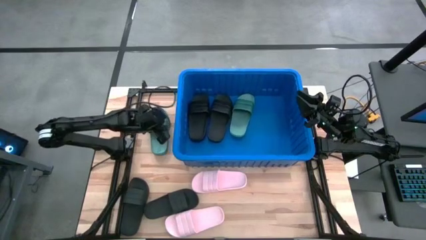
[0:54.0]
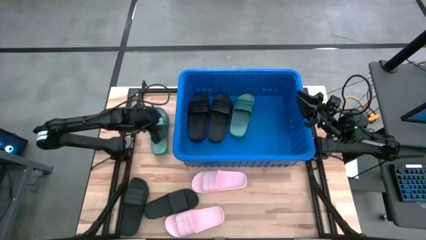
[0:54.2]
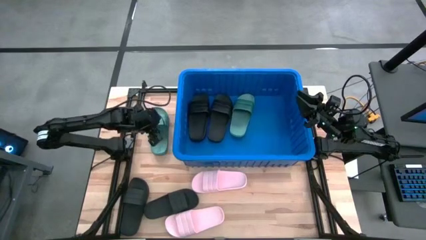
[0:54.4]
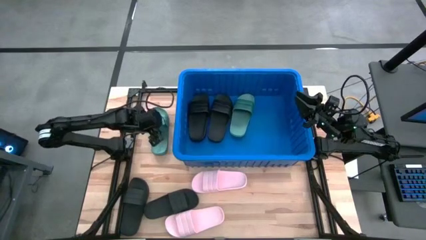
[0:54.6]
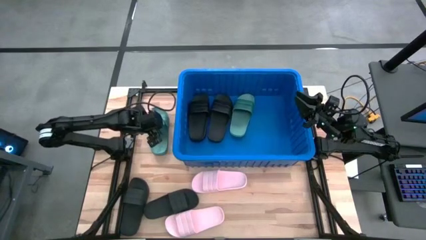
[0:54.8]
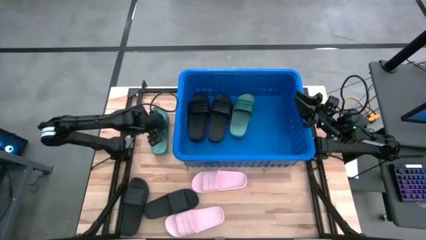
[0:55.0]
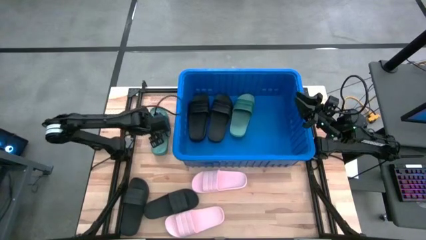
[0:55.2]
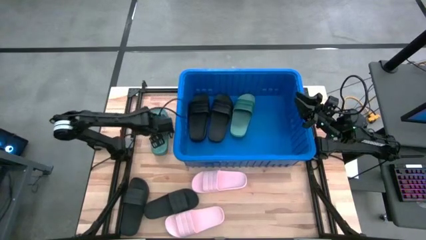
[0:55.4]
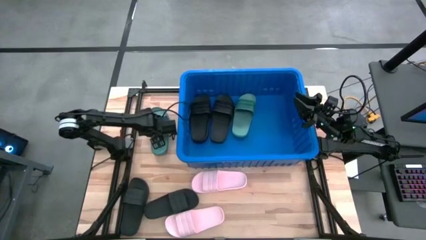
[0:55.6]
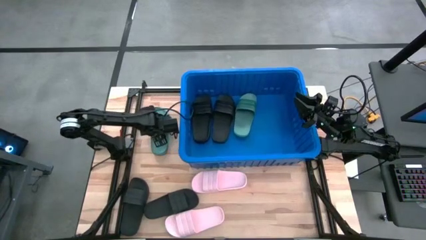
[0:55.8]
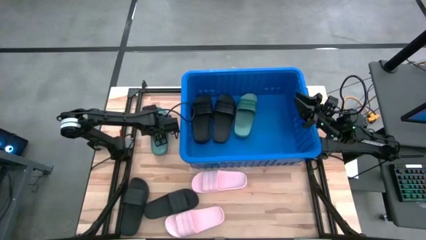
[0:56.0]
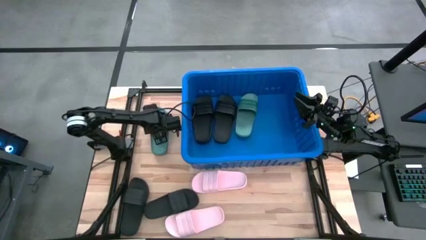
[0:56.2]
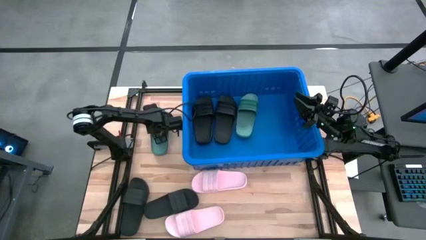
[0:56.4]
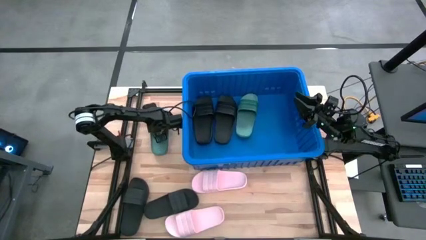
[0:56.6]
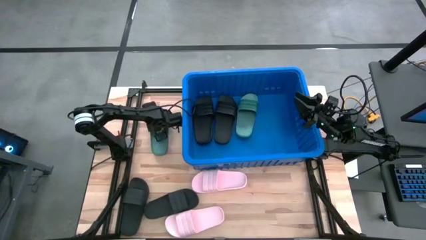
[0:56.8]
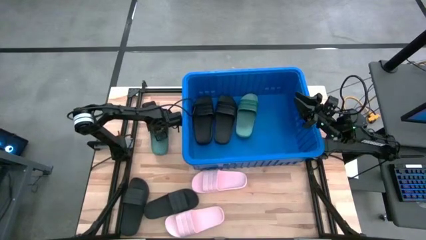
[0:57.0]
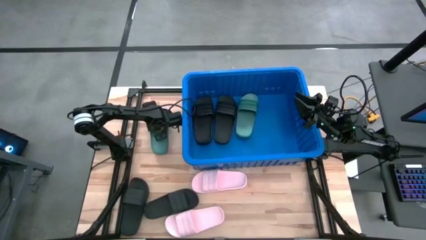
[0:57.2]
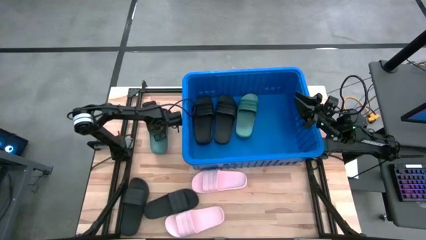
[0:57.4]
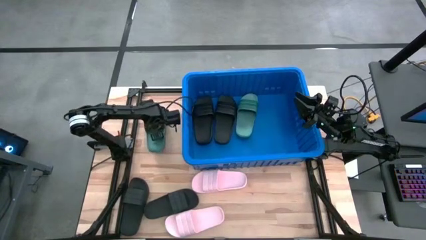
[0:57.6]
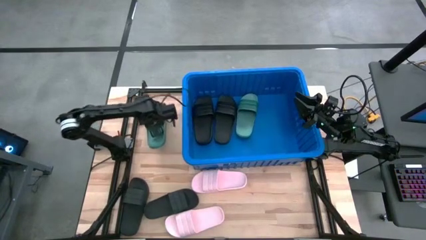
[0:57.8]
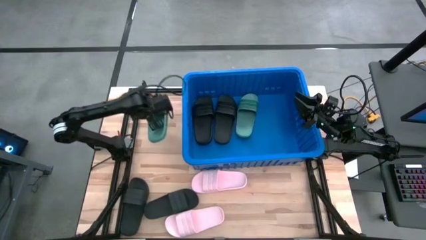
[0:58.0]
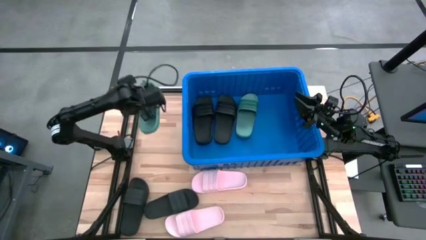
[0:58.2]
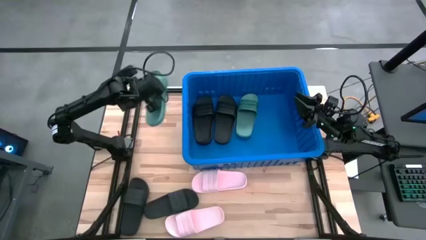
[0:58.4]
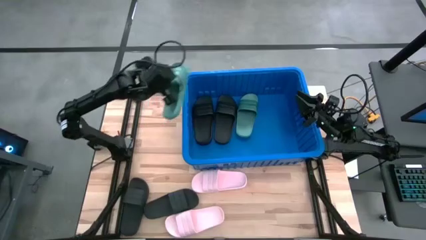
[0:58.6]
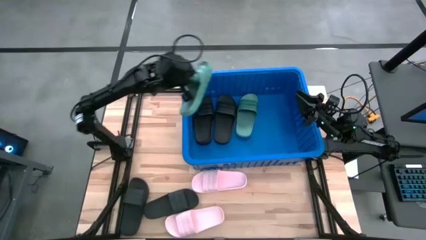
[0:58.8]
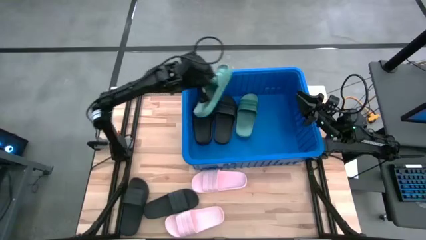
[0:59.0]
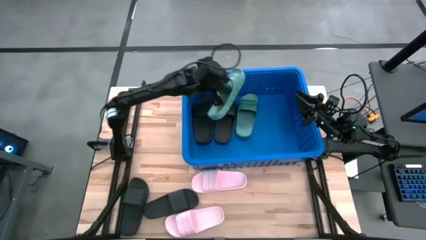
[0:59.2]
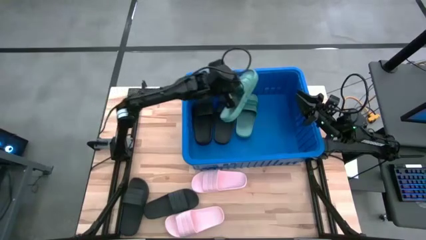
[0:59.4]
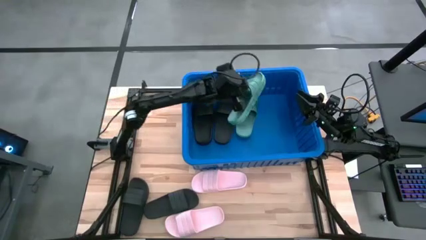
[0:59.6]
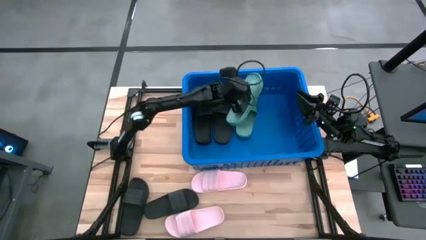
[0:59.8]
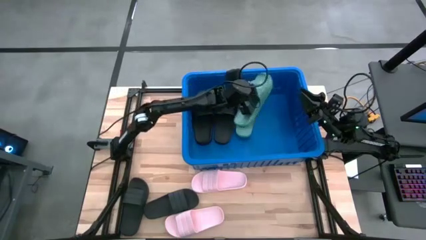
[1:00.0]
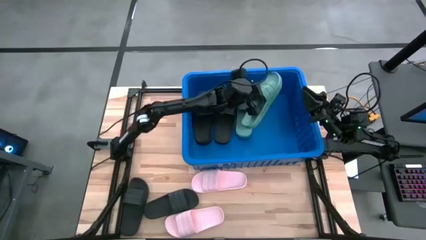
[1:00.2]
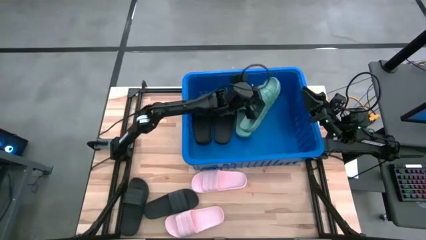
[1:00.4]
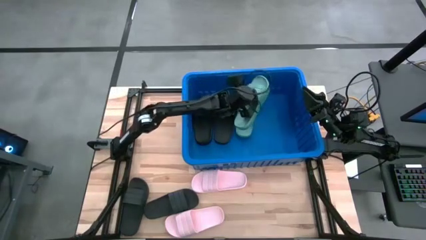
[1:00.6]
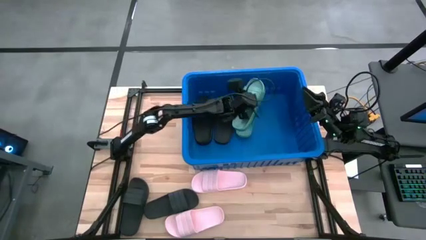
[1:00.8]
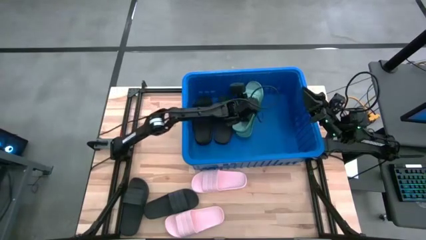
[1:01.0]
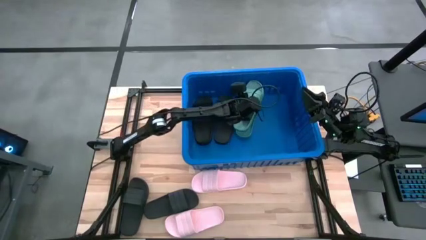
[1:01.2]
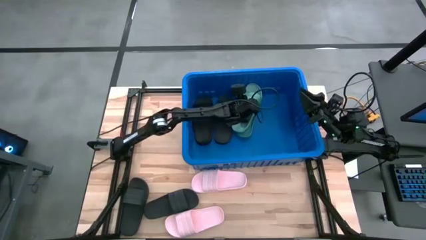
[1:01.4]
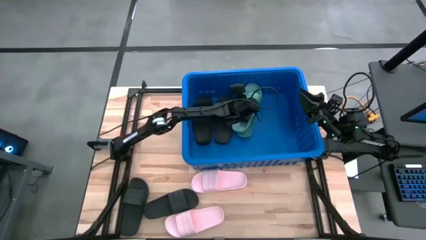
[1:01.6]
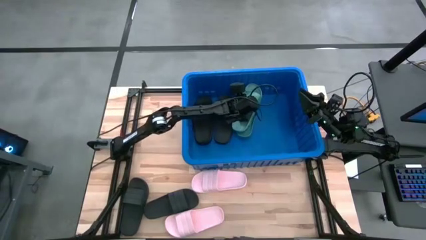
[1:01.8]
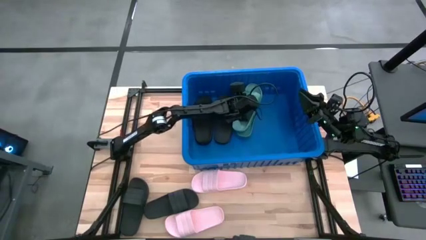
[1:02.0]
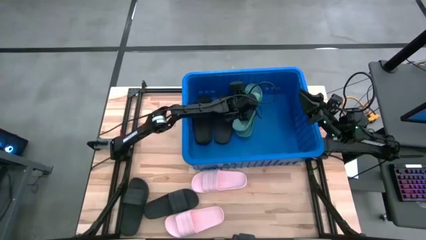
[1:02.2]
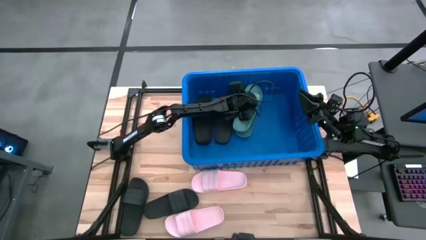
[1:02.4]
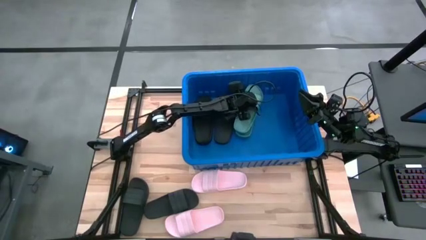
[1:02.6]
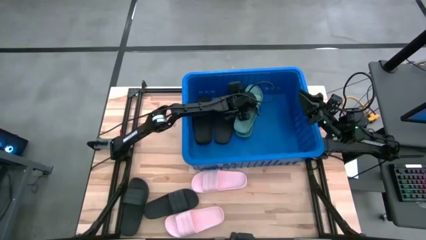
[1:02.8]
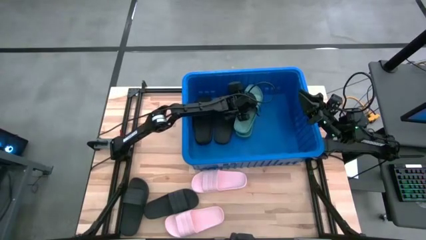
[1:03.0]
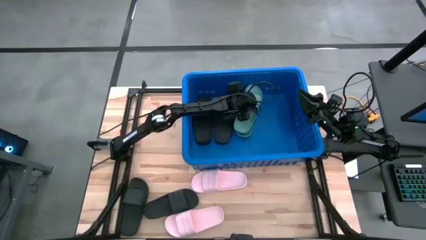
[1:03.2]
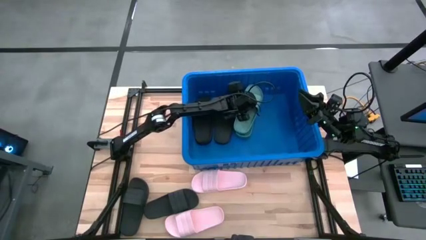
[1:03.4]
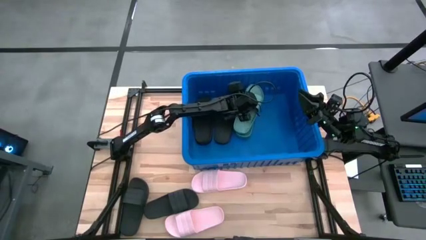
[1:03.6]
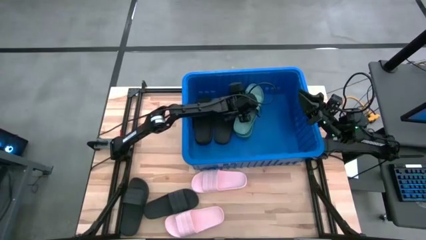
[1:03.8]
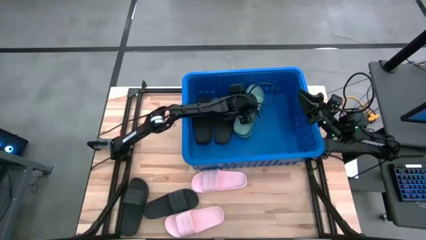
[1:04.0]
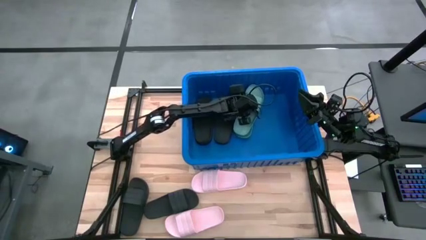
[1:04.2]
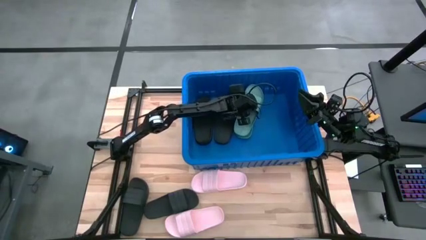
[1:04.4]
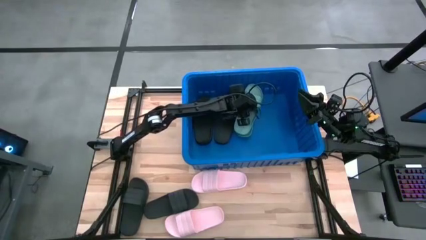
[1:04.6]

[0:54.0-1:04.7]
Task: Pick and place slides into bin
Put the green slide into the blue bin
